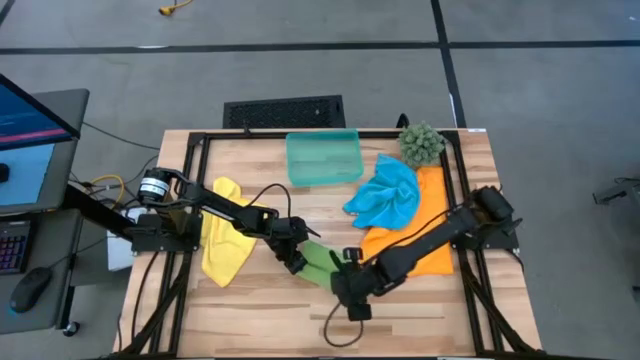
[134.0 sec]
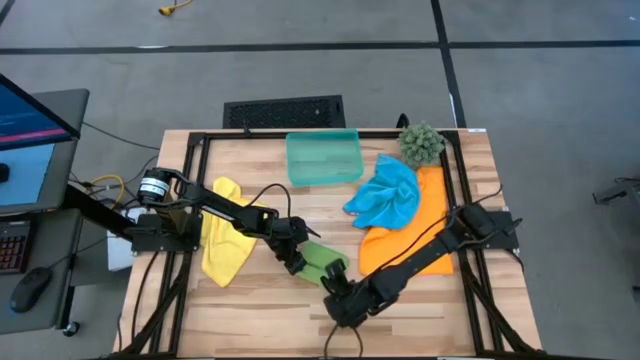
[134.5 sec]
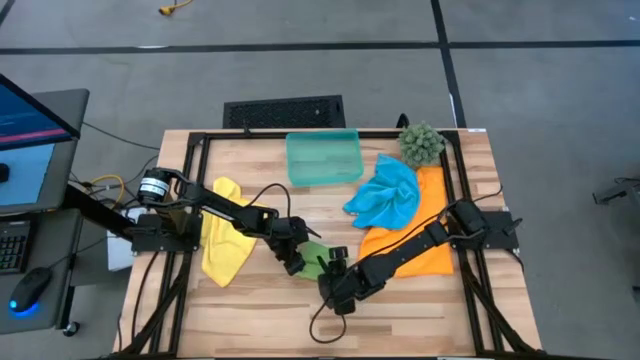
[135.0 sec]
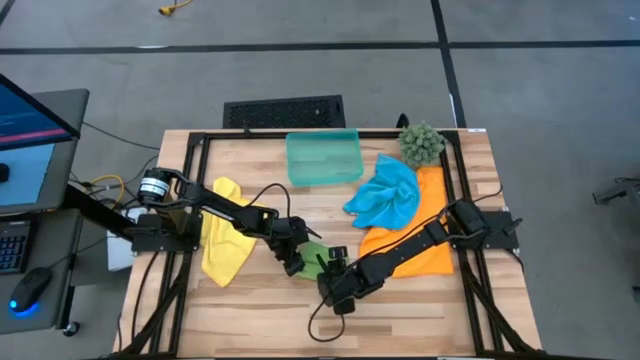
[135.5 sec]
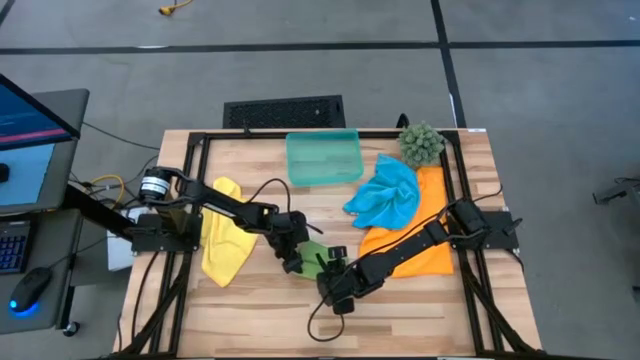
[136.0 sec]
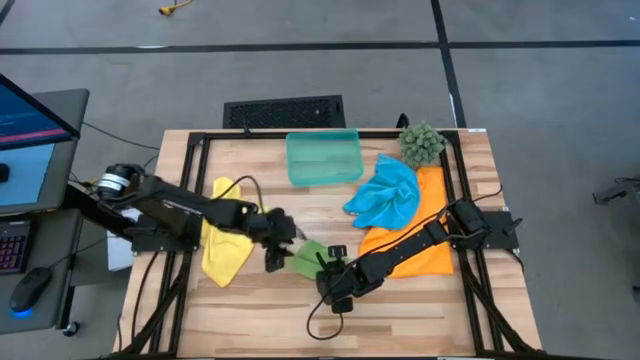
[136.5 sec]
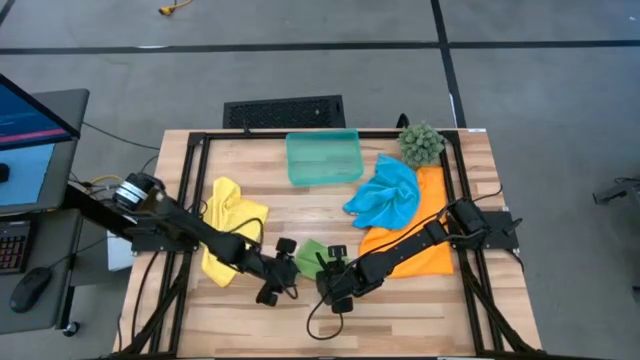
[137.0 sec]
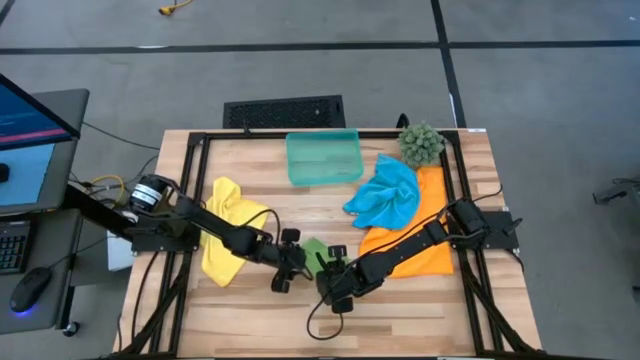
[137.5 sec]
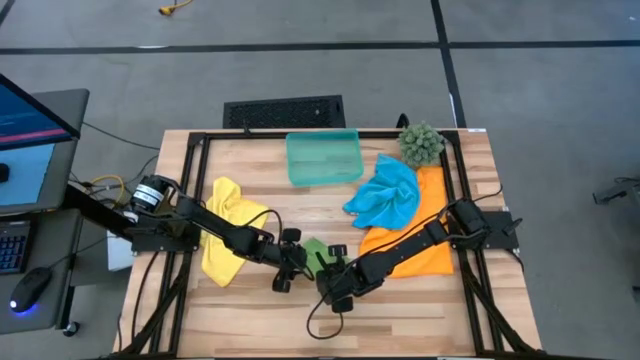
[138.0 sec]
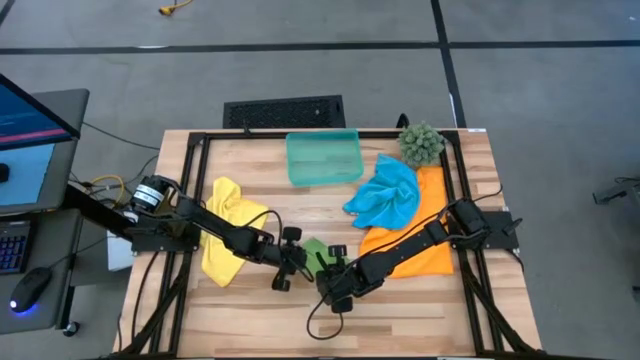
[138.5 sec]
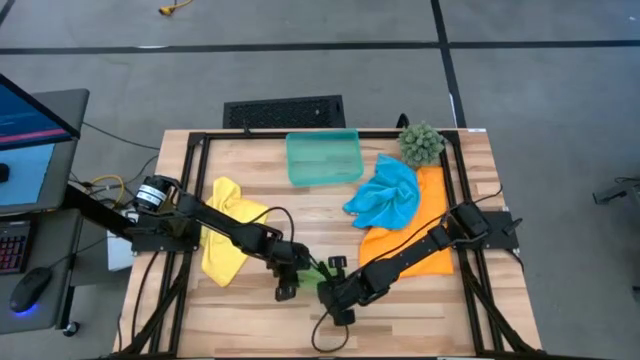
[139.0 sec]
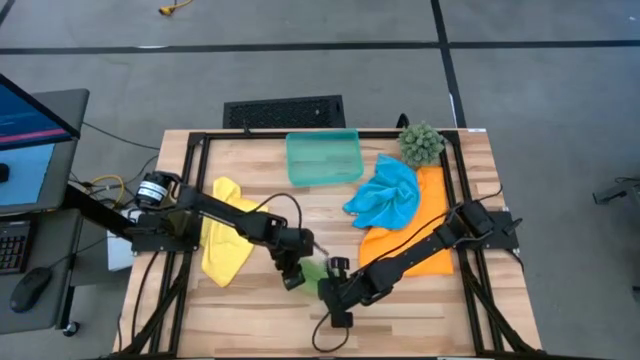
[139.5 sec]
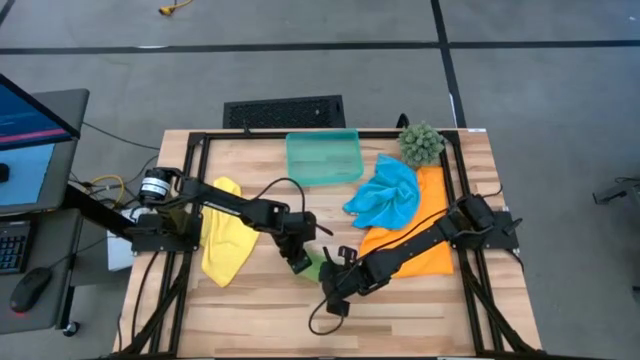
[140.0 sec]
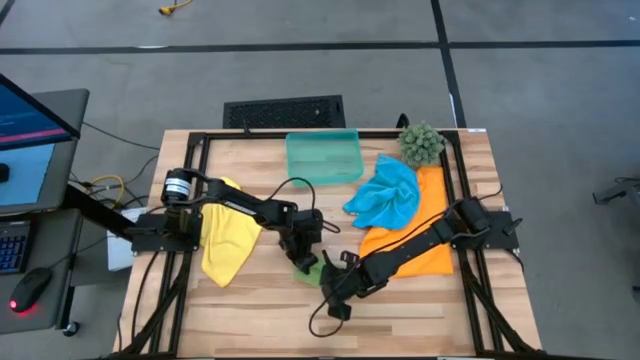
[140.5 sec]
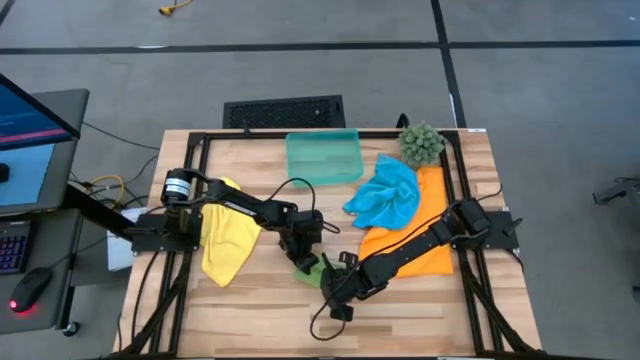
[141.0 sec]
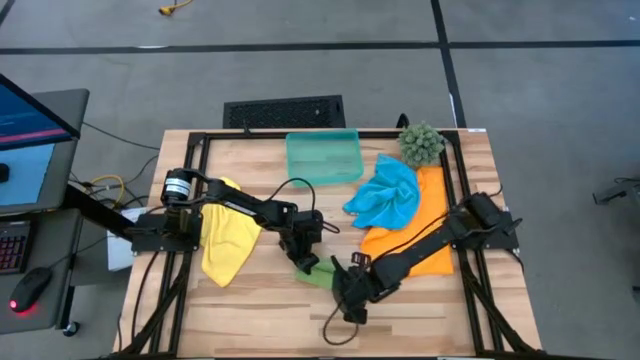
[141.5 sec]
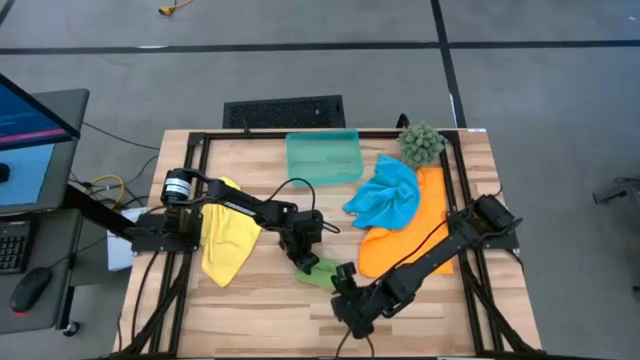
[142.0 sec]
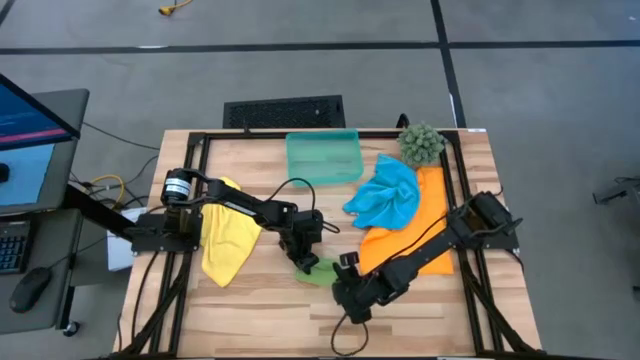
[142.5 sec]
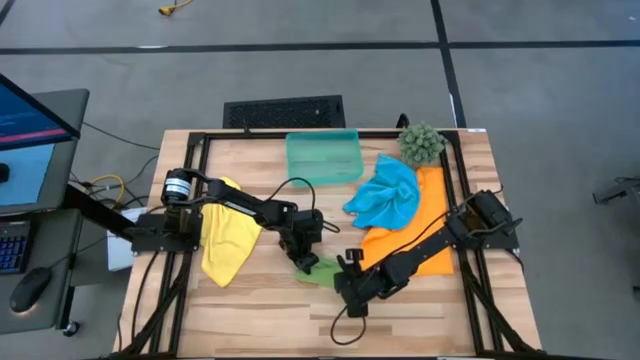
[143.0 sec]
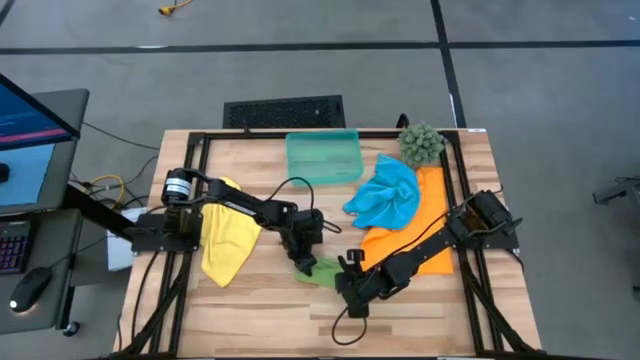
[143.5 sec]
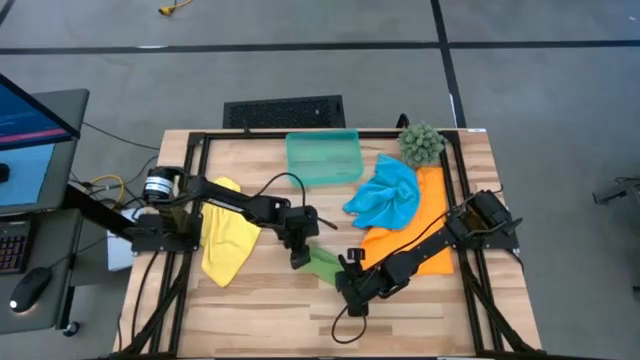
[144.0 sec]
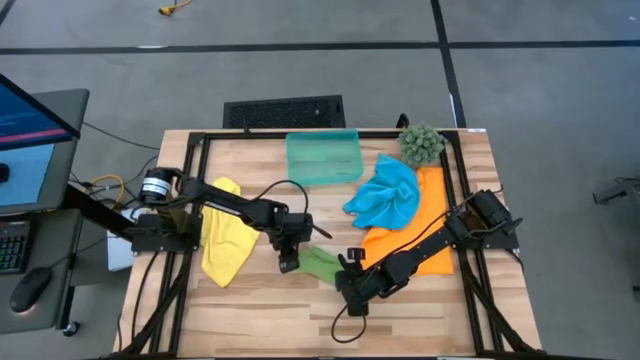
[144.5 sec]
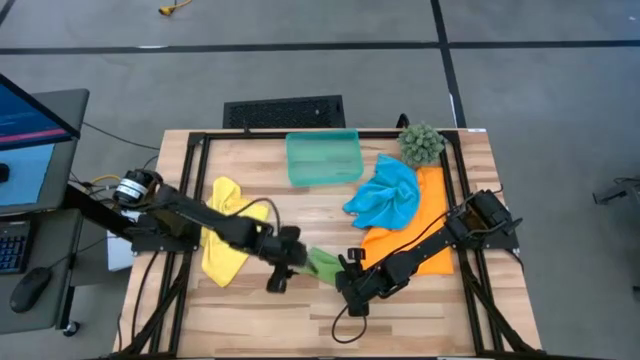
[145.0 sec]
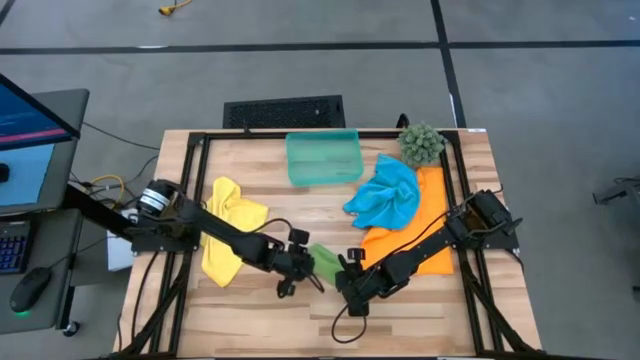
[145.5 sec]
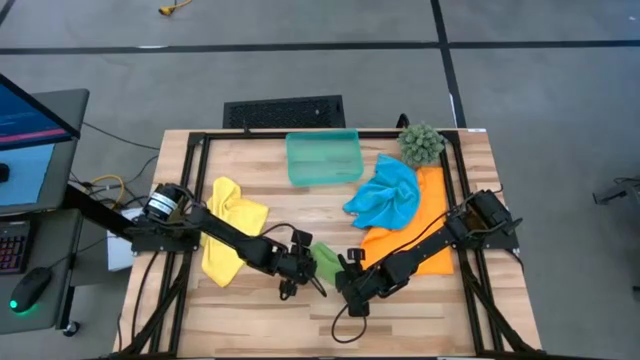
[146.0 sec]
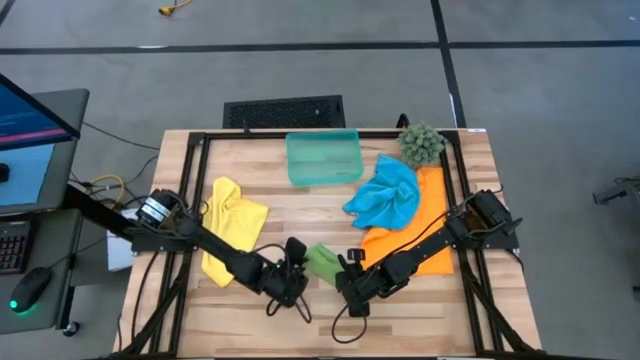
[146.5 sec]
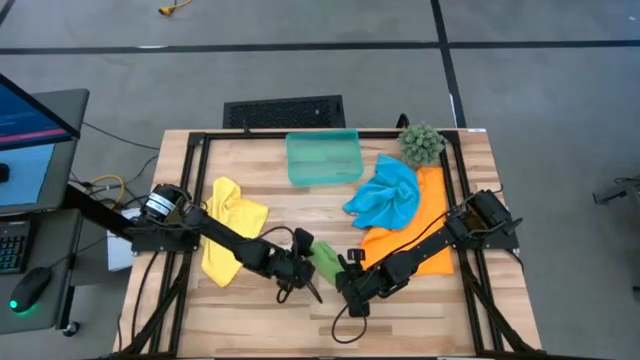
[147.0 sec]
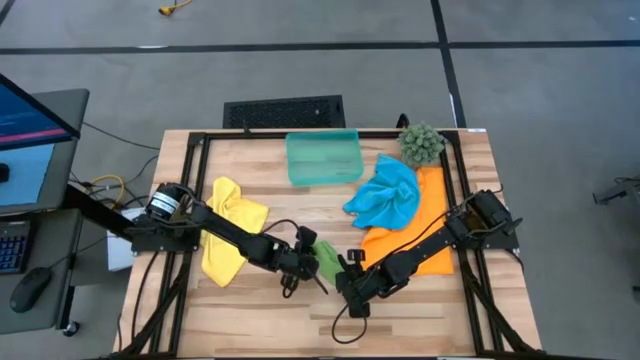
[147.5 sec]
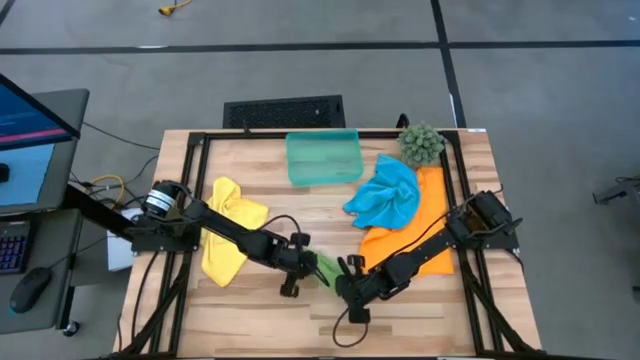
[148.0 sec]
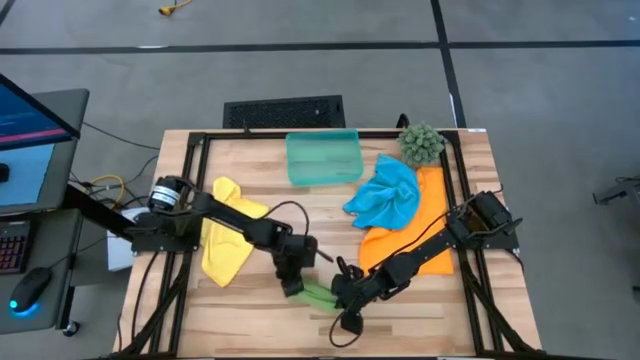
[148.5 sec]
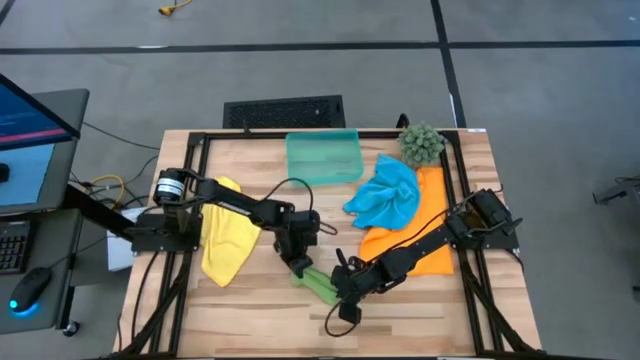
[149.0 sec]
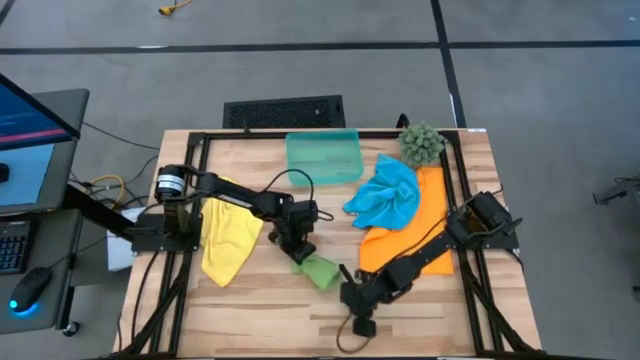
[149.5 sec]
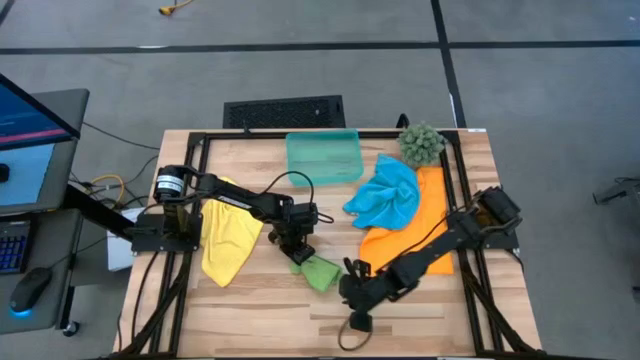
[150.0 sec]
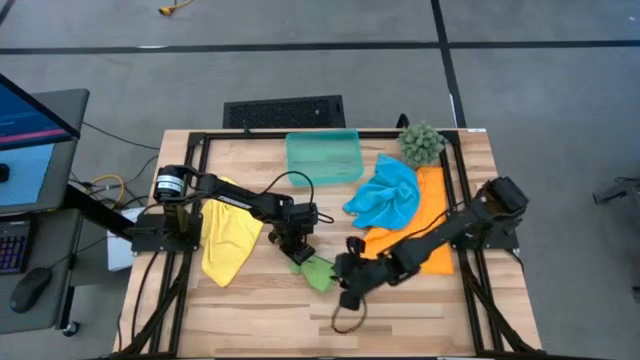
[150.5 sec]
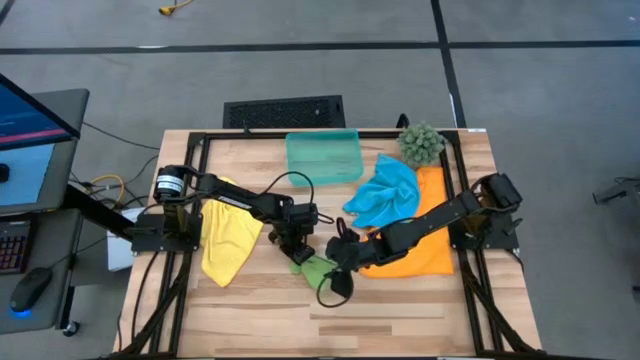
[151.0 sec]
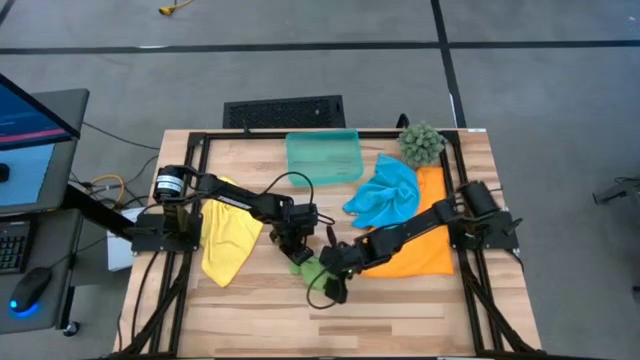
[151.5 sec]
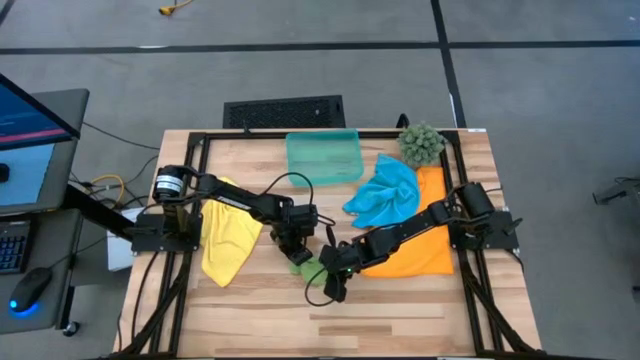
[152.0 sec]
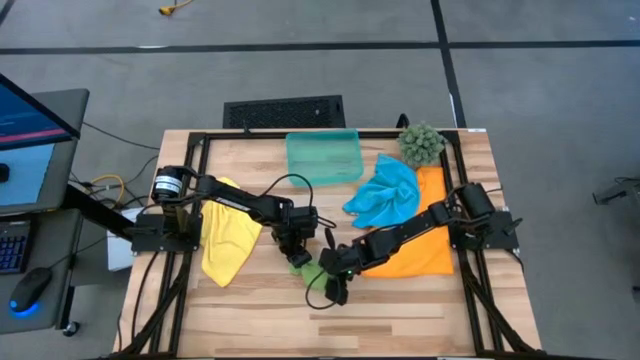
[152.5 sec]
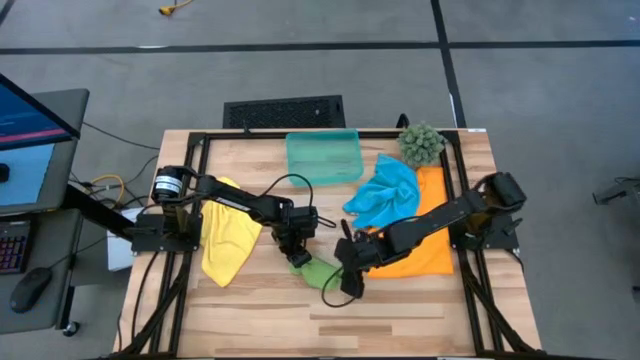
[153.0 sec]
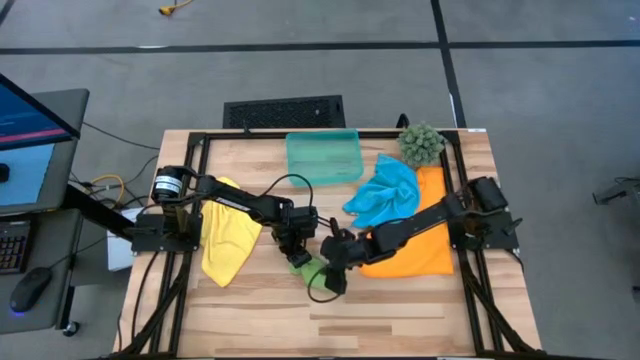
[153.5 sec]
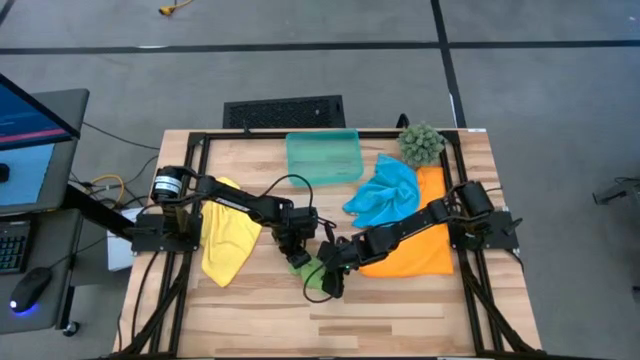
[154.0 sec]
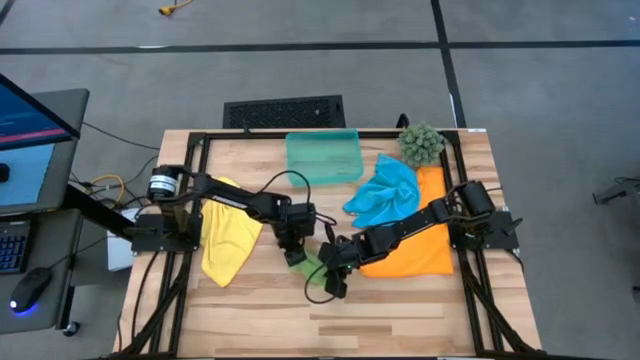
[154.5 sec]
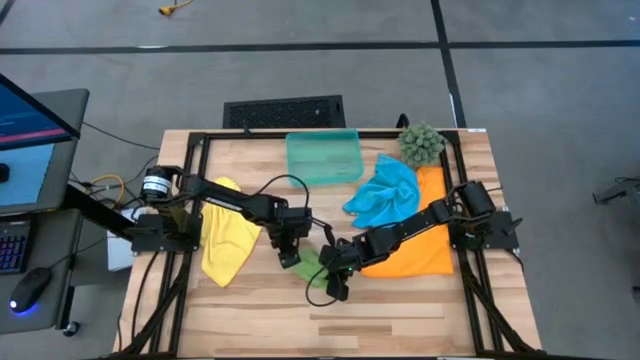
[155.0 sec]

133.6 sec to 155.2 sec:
Task: Roll microfiber towels into tight, uniform cylinder then place into a basket
Roll the green microfiber cloth
